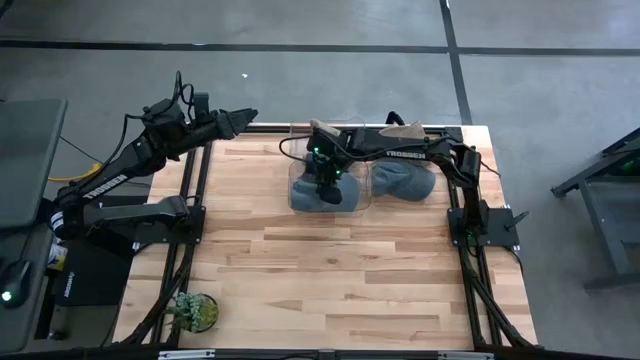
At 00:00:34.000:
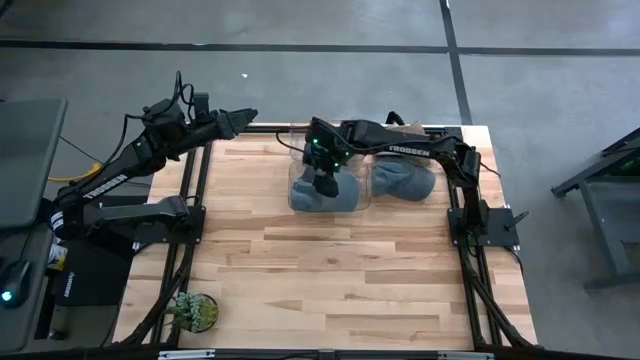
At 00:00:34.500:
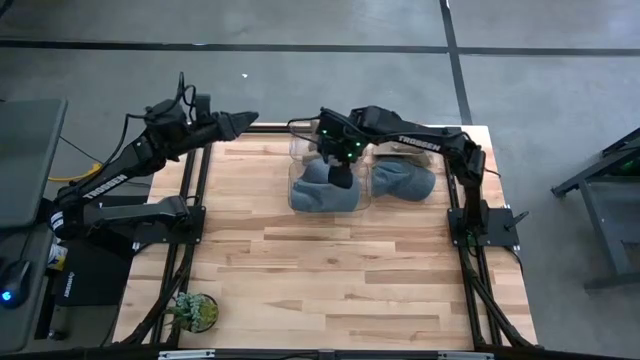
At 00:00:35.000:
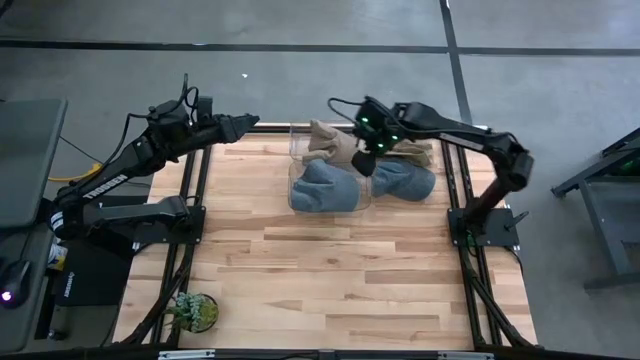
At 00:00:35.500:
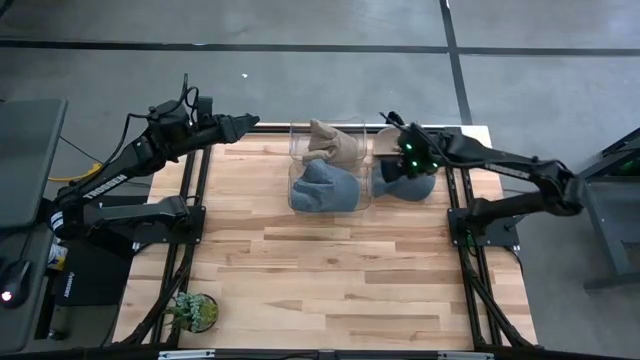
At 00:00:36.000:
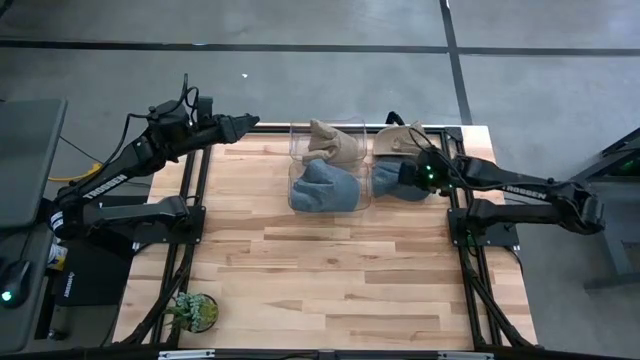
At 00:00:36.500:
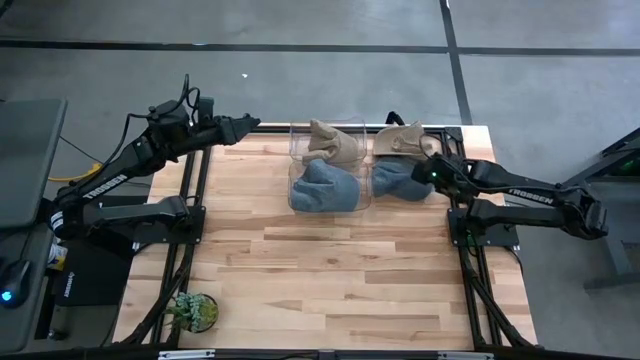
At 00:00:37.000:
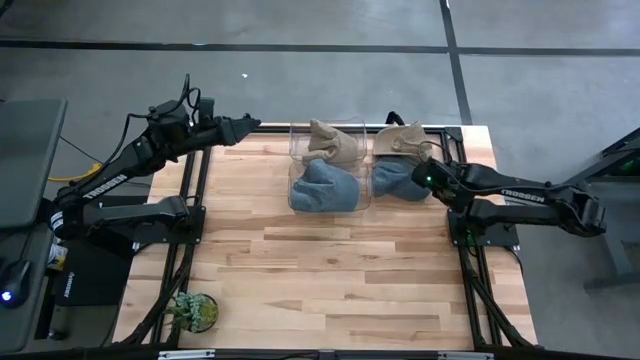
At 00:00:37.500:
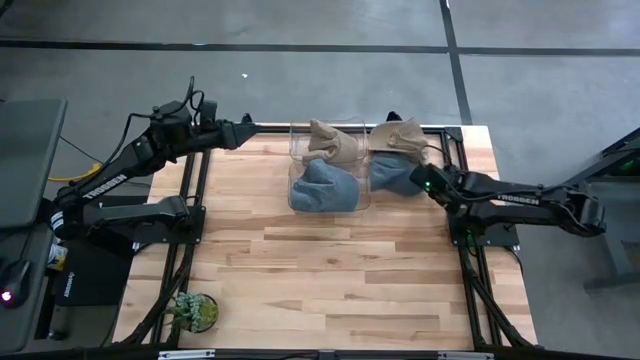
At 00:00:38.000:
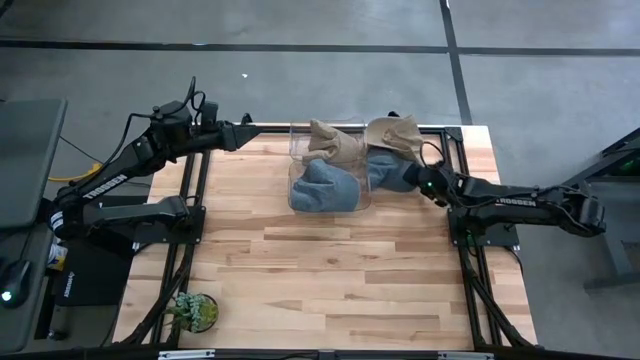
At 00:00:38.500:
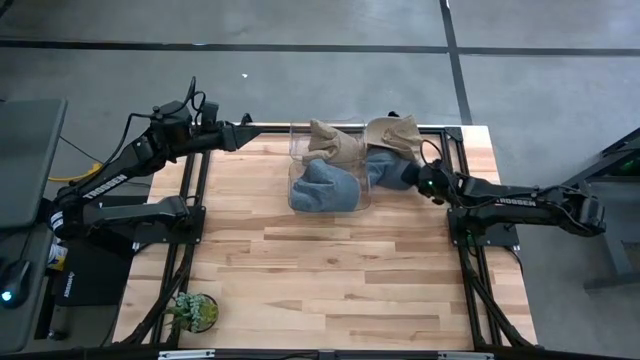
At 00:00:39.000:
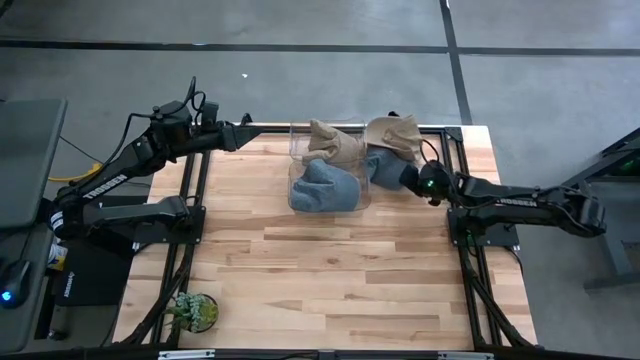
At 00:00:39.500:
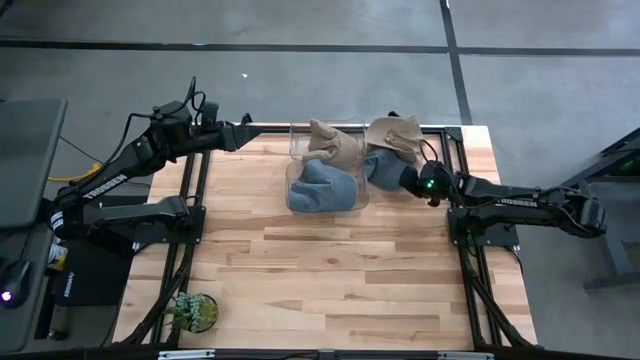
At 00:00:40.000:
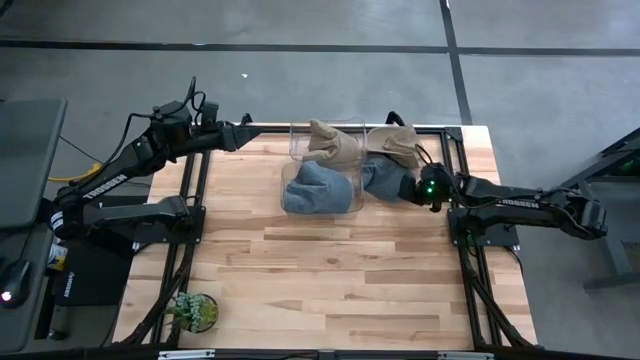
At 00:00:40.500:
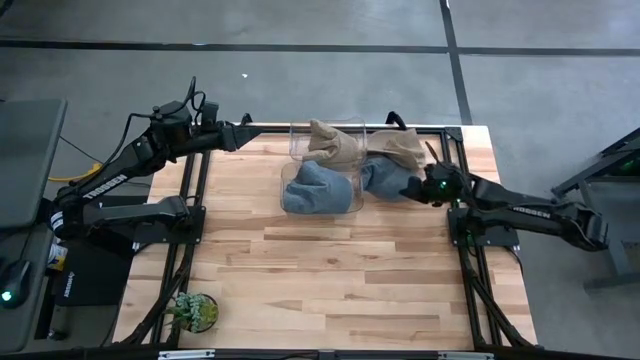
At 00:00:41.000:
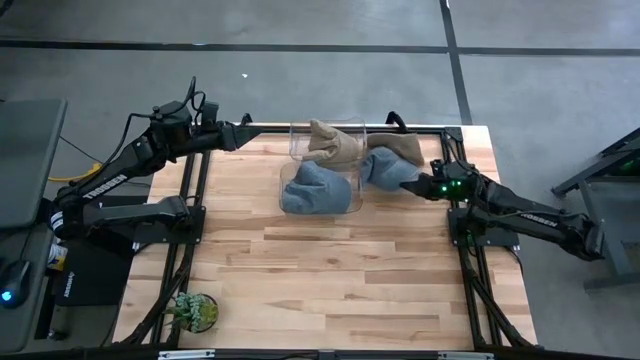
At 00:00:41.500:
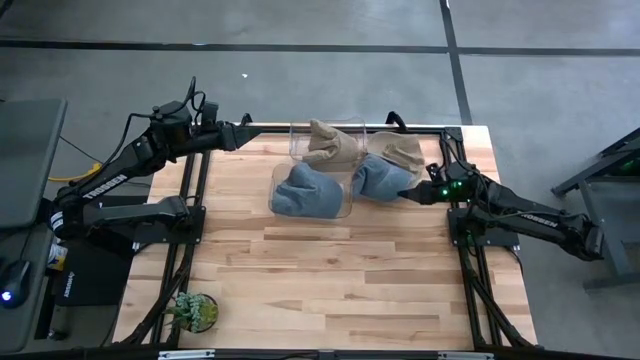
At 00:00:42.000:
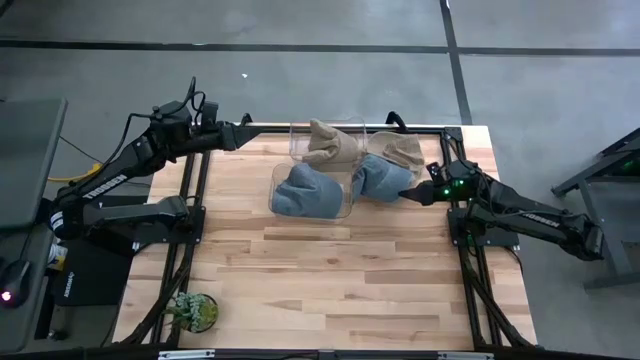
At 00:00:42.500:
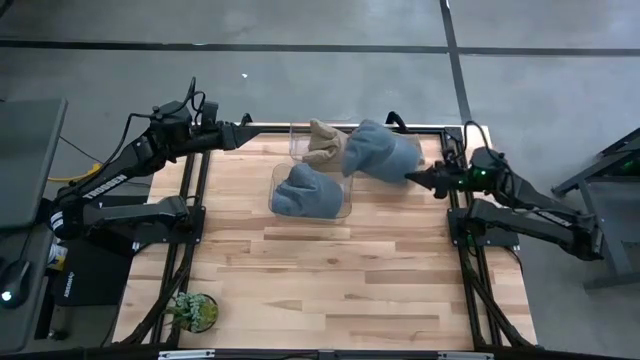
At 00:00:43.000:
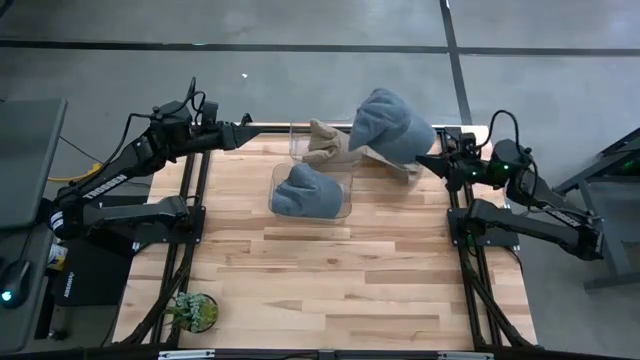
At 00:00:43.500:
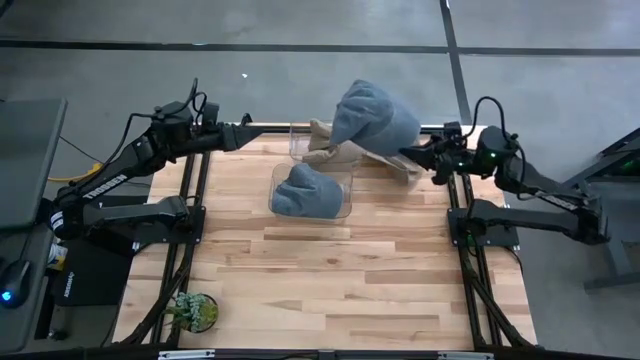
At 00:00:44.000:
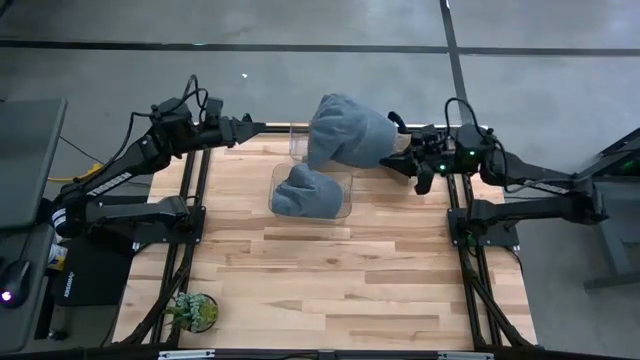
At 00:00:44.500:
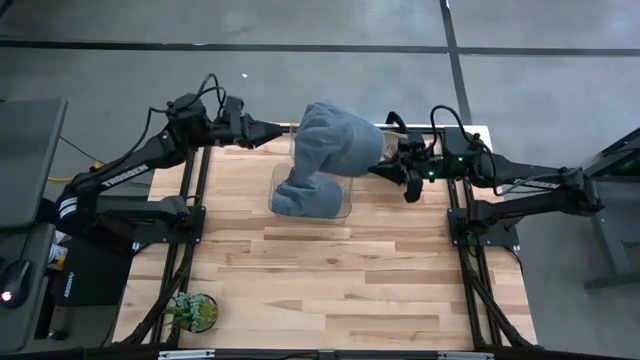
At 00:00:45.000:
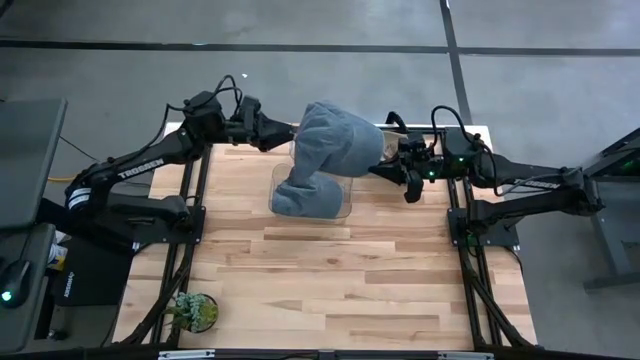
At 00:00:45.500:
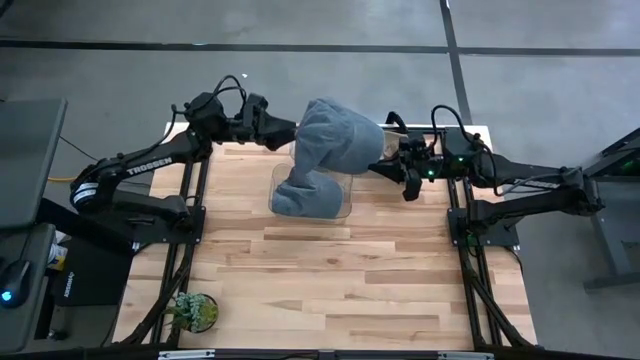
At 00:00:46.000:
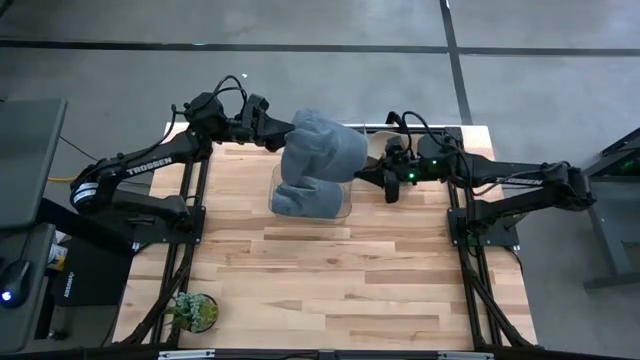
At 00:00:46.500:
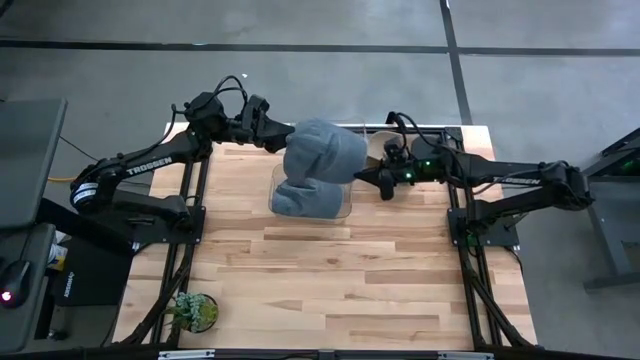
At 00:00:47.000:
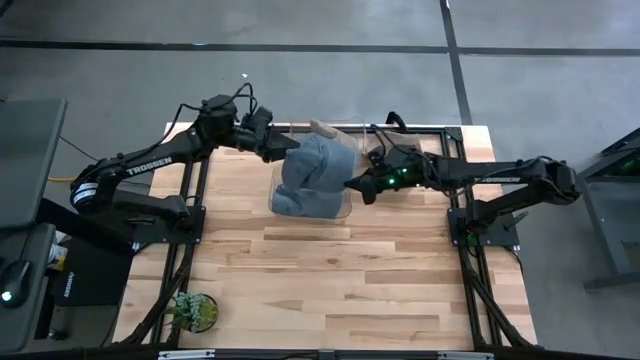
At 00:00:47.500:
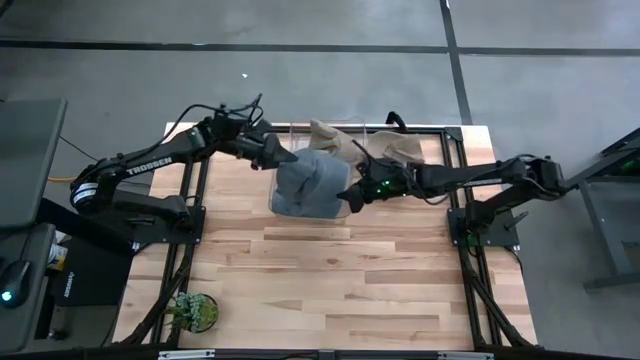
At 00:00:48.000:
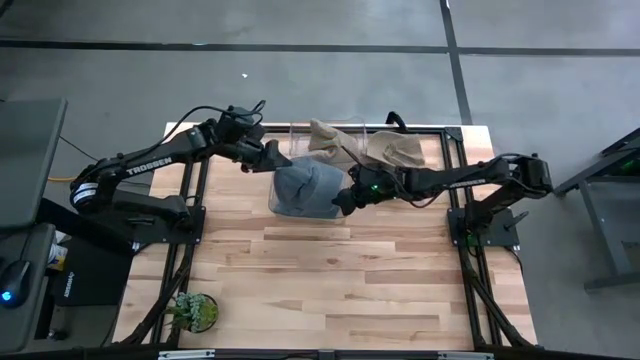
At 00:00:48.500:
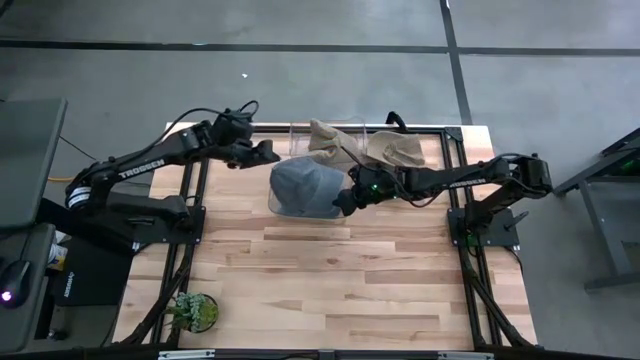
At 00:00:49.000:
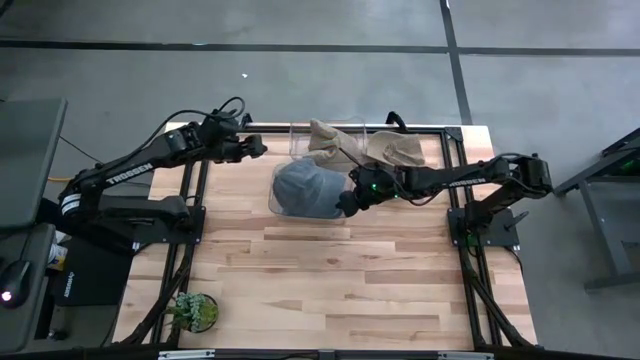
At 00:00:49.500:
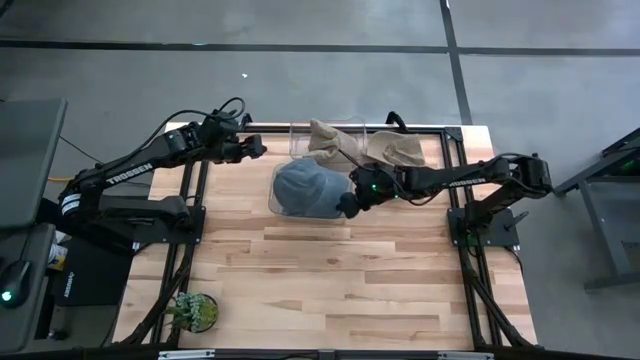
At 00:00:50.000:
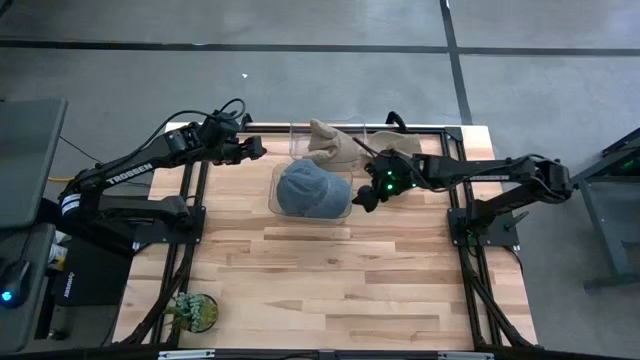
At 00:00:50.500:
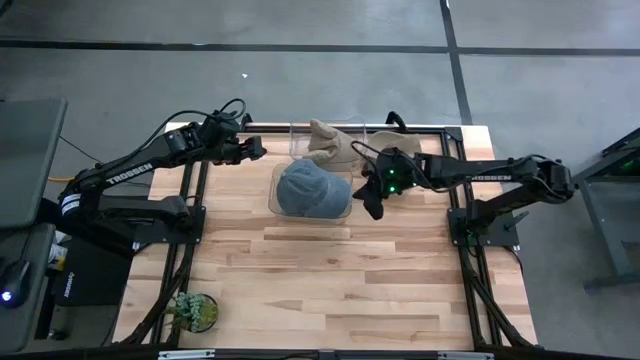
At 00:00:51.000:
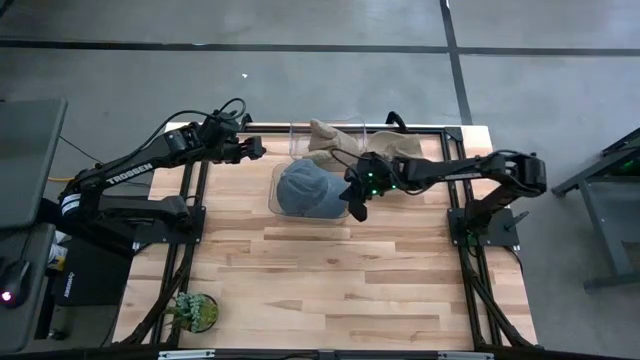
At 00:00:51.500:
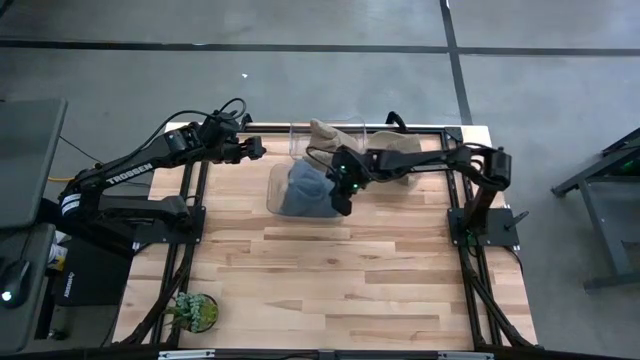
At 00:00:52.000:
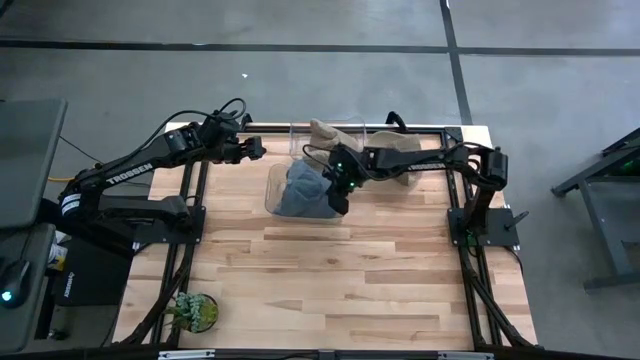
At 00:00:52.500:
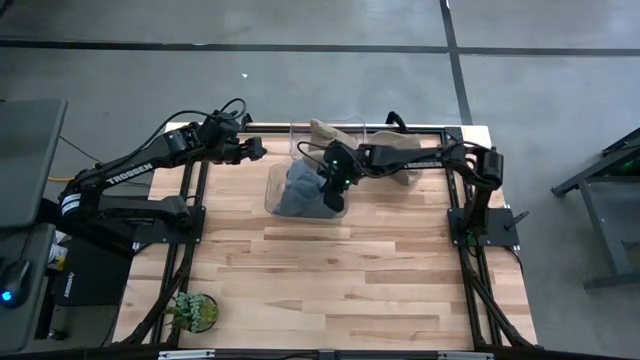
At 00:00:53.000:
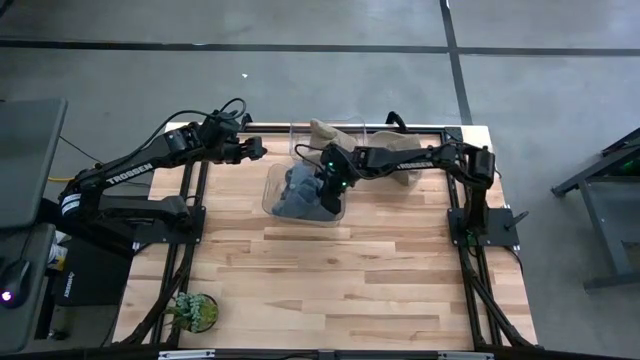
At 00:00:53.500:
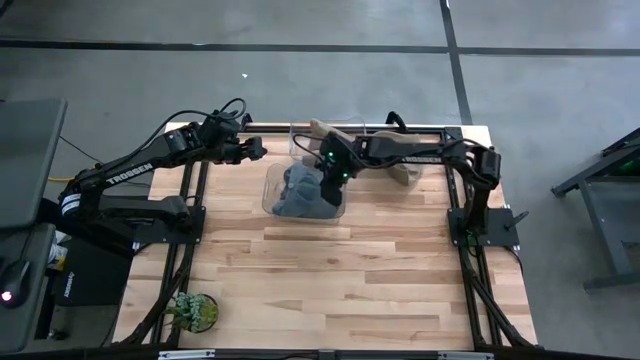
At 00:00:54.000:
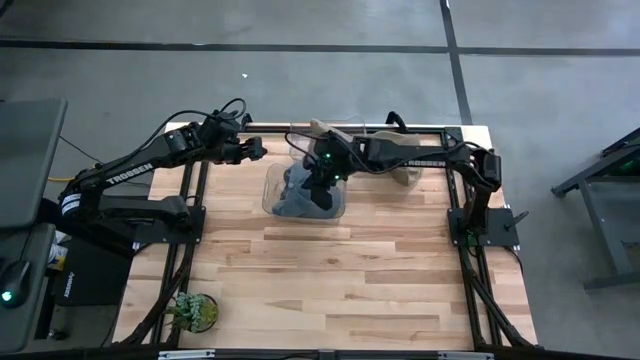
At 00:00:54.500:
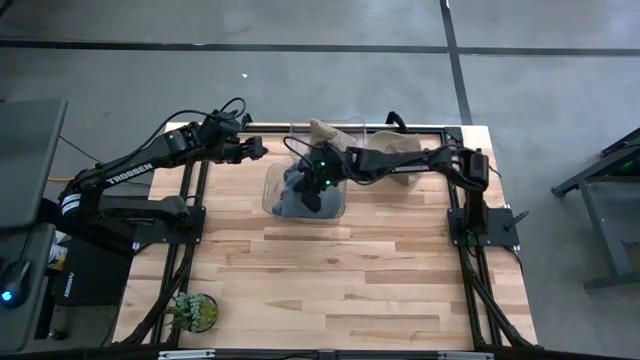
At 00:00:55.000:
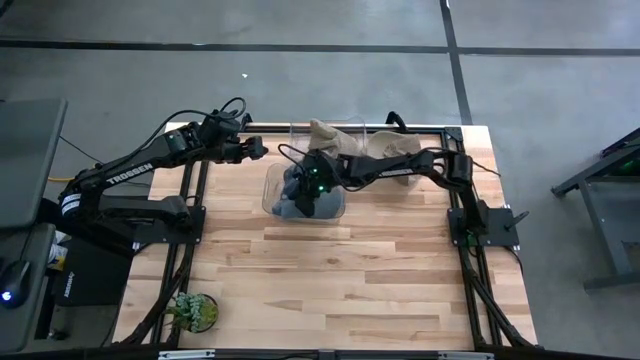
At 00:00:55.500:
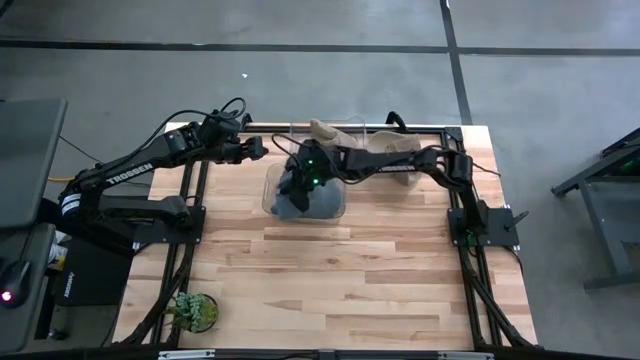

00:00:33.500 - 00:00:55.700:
Task: Pick & Place hat
Put the blue cap into the bottom transparent bin
